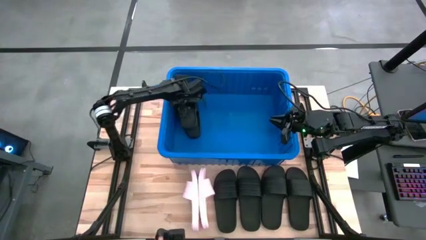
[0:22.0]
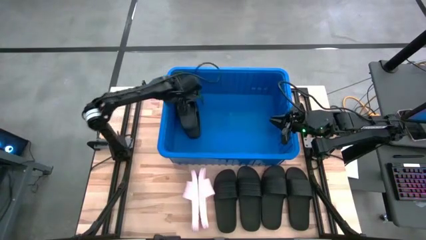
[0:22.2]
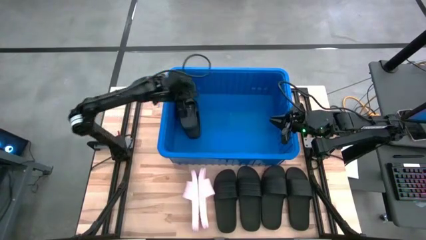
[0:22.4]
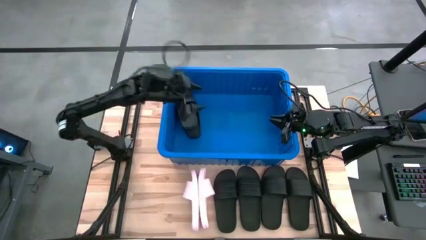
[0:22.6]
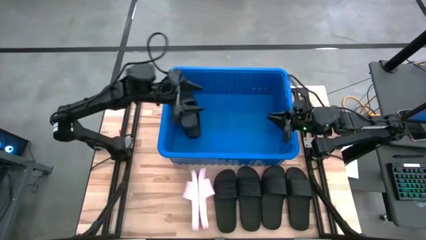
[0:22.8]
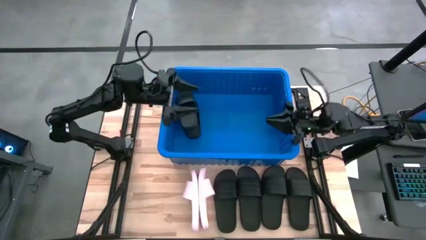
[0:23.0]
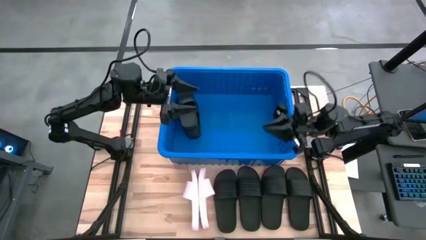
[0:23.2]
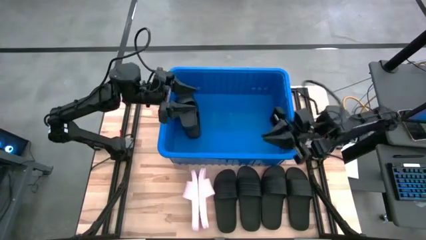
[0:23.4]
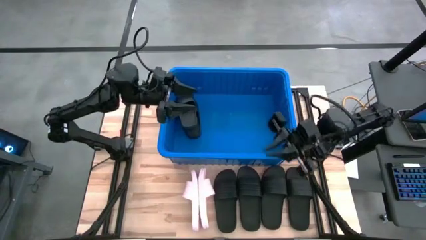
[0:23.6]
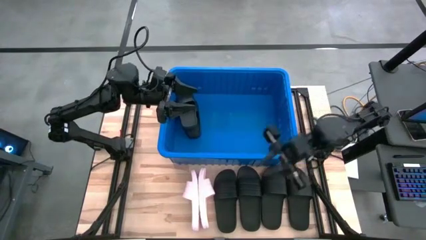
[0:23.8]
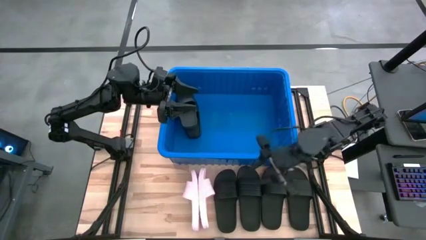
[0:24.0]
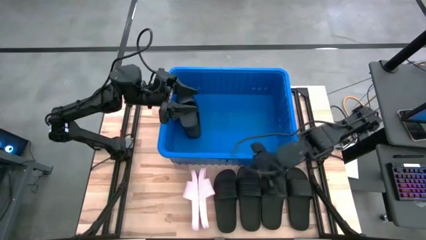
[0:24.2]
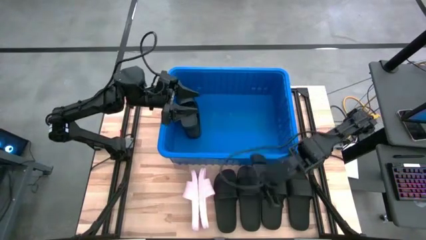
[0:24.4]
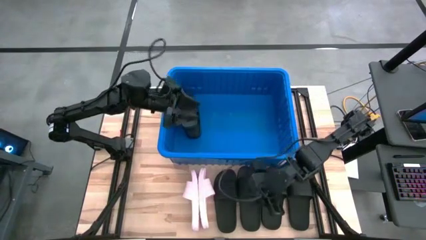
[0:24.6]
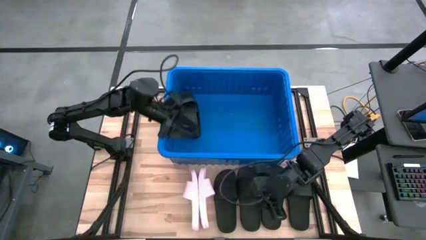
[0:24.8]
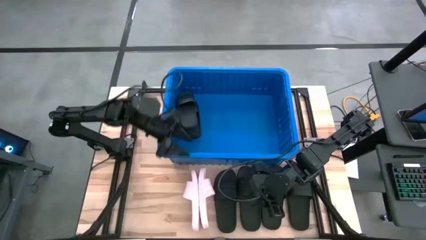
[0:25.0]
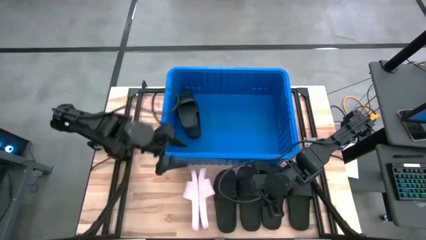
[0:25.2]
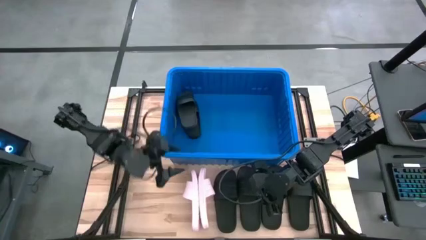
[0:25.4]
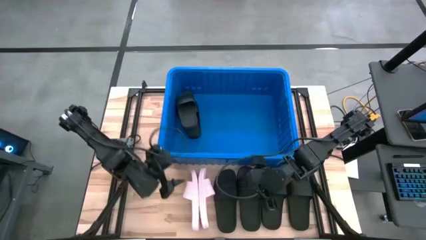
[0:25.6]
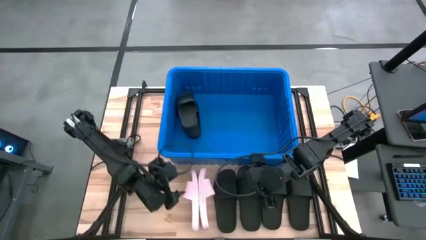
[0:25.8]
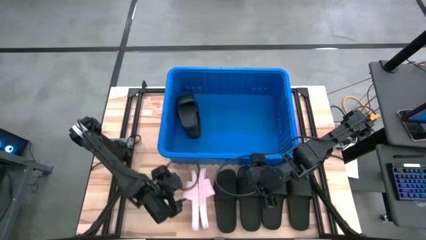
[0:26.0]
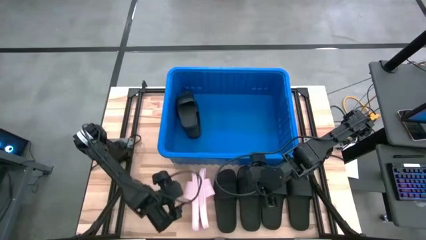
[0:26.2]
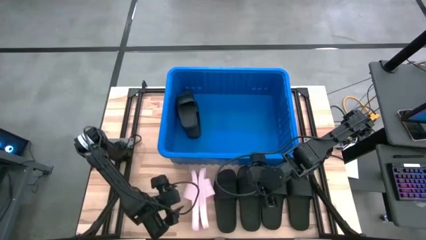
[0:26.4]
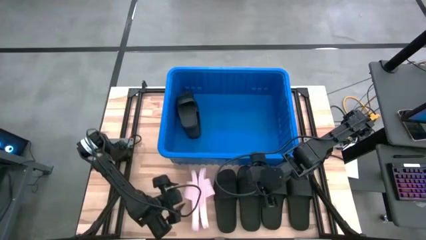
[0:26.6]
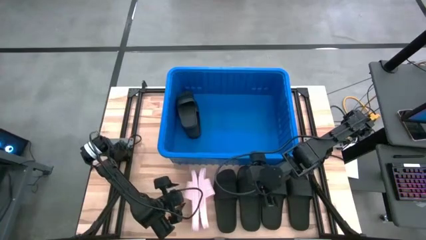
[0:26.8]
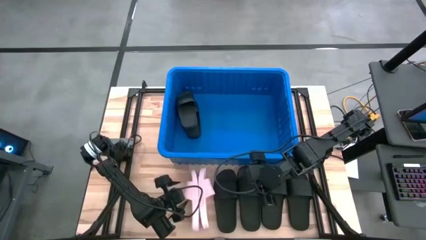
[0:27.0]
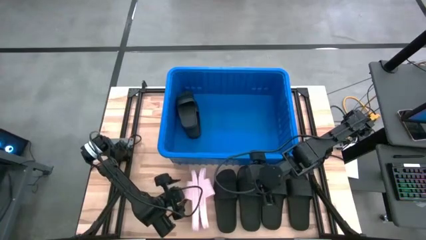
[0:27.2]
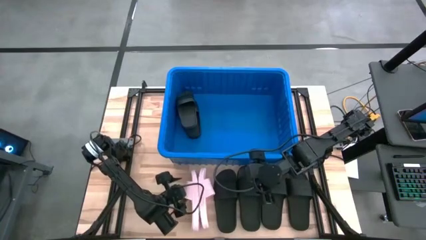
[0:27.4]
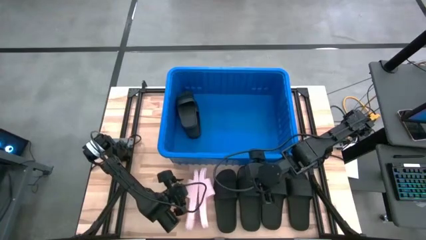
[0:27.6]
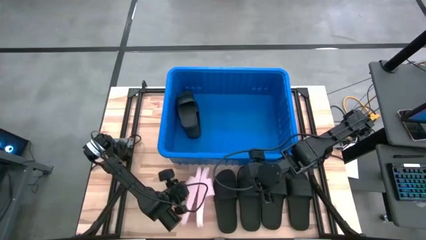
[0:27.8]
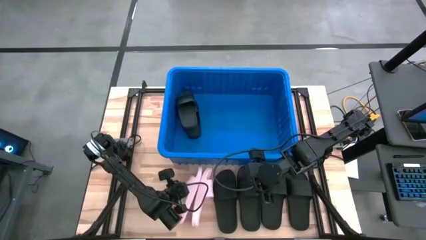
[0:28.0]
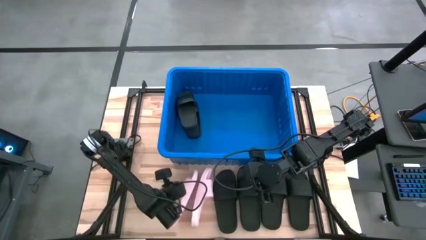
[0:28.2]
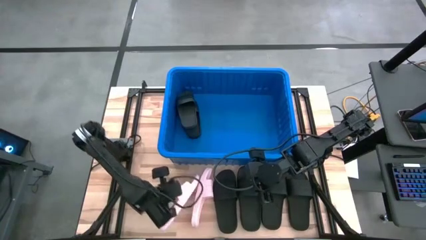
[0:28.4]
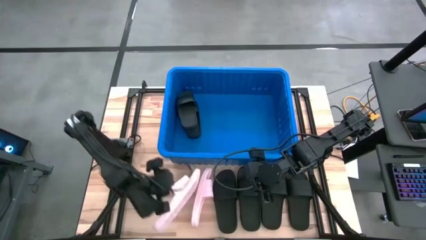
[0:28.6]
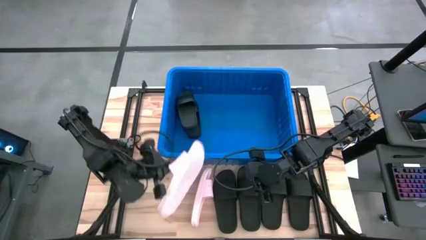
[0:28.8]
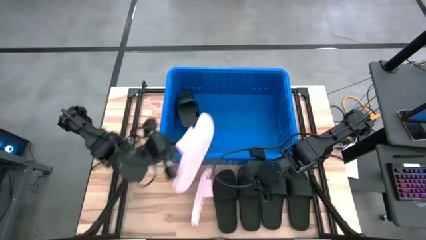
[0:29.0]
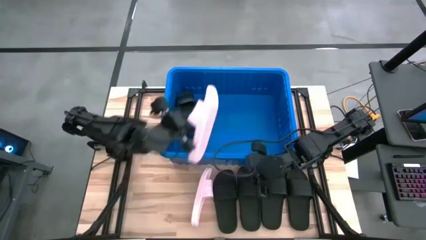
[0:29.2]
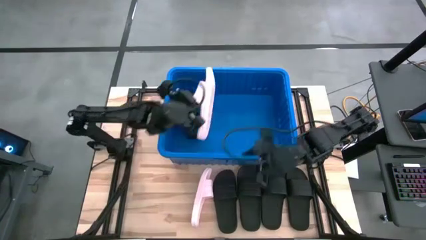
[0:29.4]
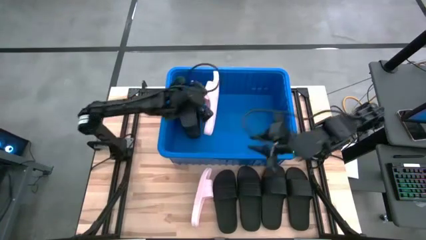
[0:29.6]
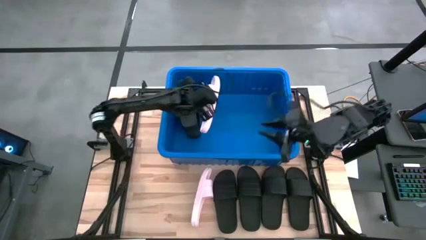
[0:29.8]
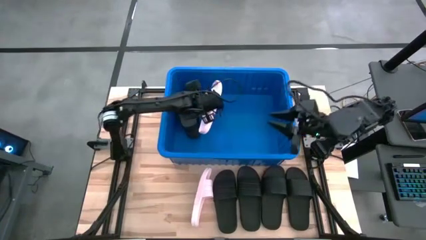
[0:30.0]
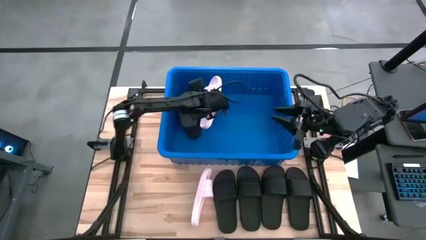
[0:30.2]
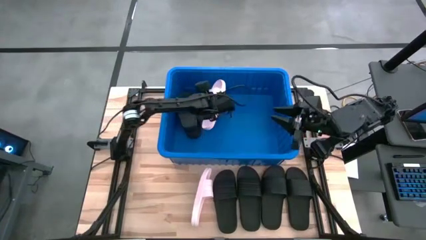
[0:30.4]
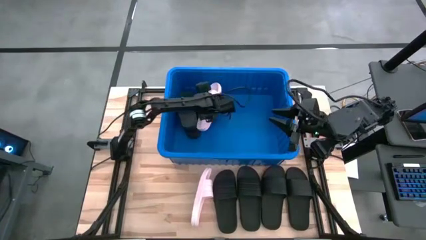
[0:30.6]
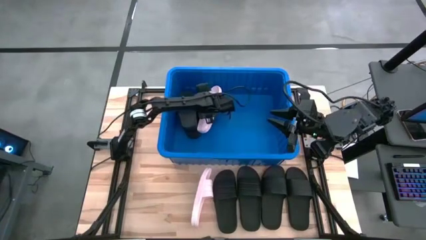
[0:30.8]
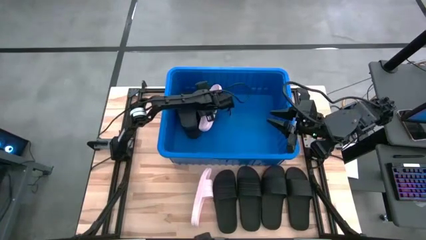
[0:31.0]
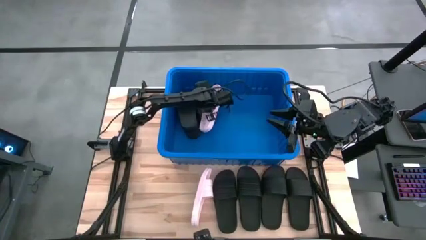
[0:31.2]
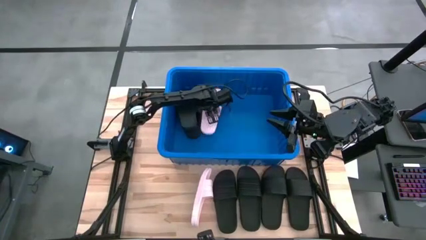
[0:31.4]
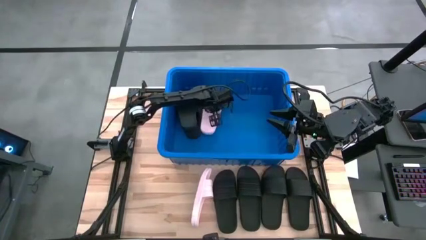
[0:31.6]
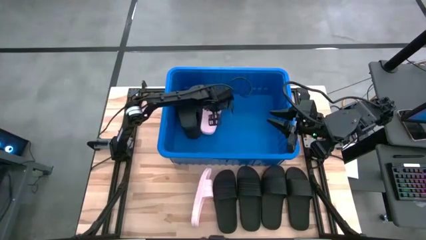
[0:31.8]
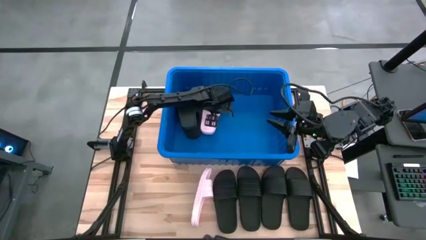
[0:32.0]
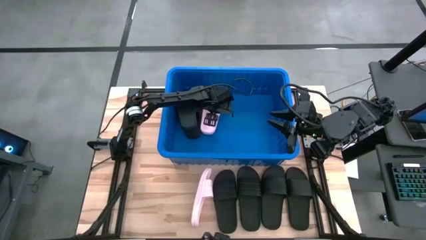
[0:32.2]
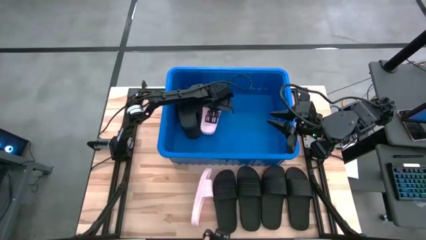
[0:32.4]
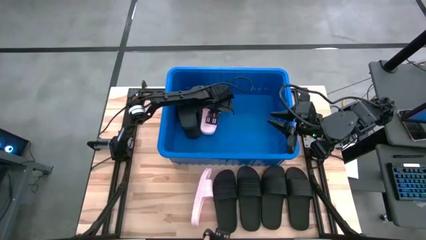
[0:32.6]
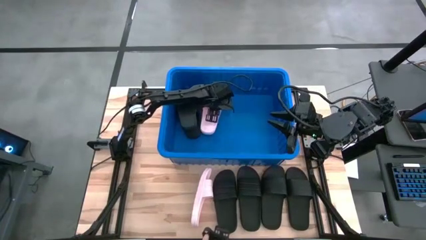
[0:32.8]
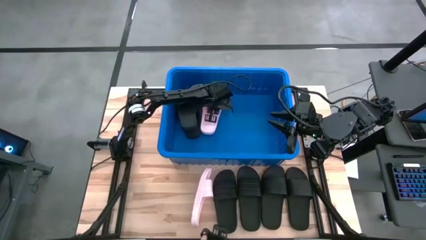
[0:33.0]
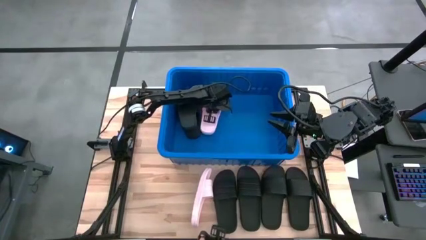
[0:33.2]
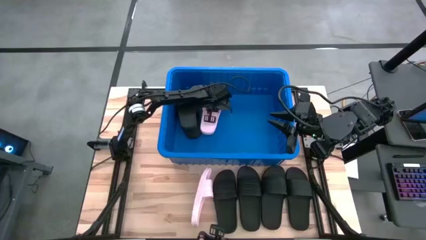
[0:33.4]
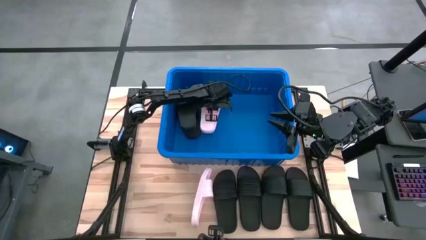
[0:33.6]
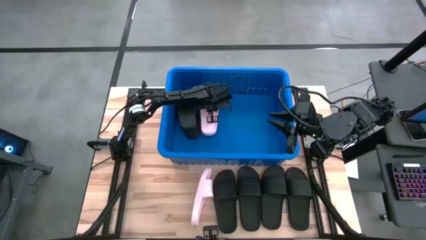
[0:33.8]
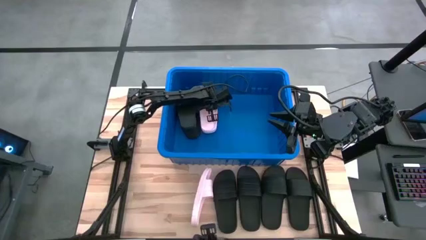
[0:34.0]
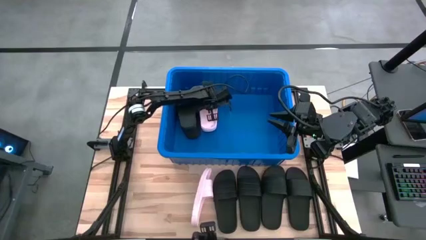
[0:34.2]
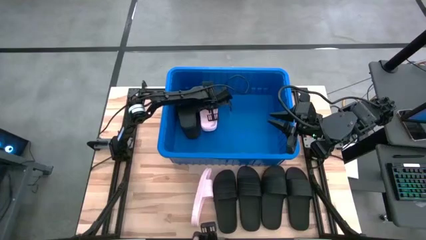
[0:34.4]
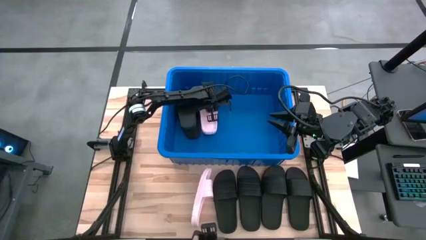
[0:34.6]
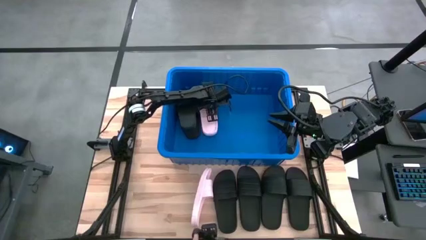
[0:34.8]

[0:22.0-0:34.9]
Task: Pick and place slides into bin
Put the left pink slide into the blue container
